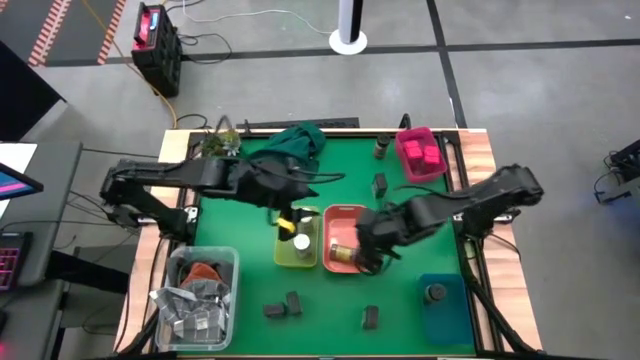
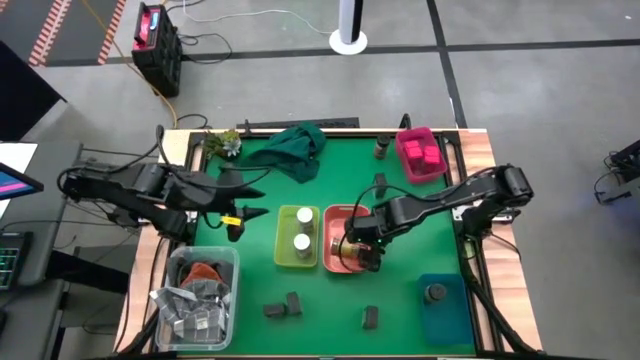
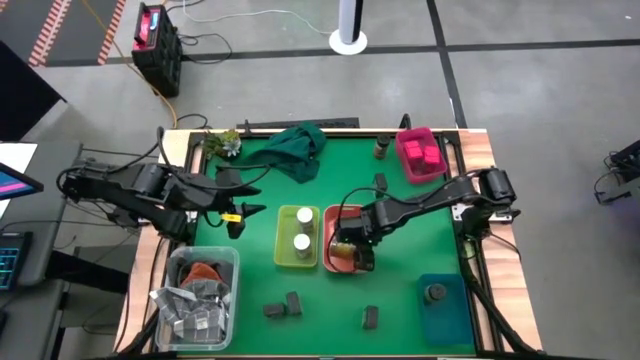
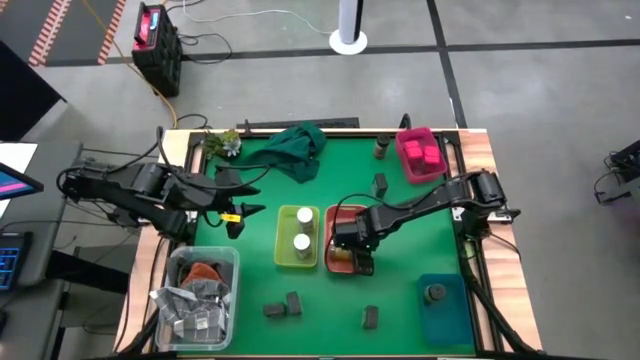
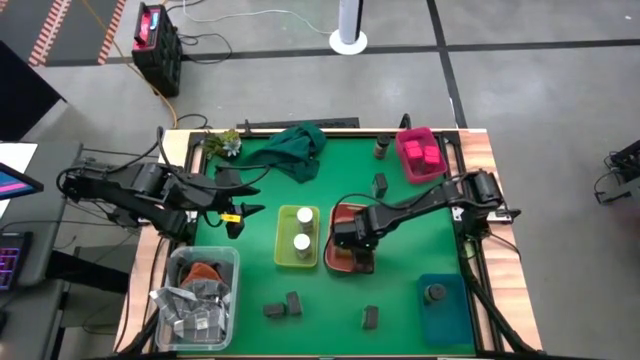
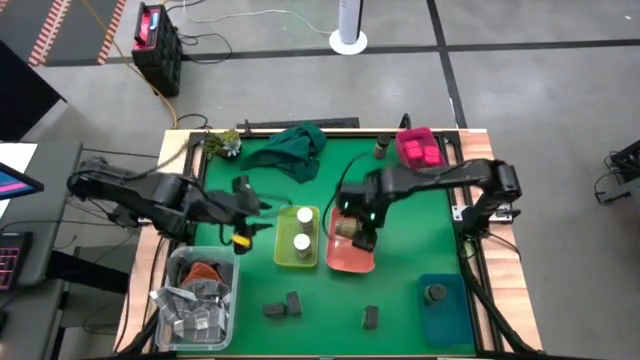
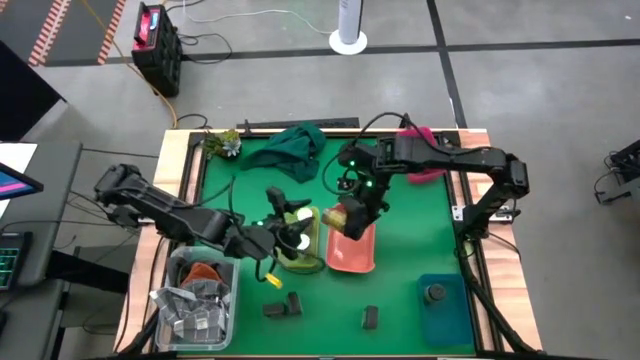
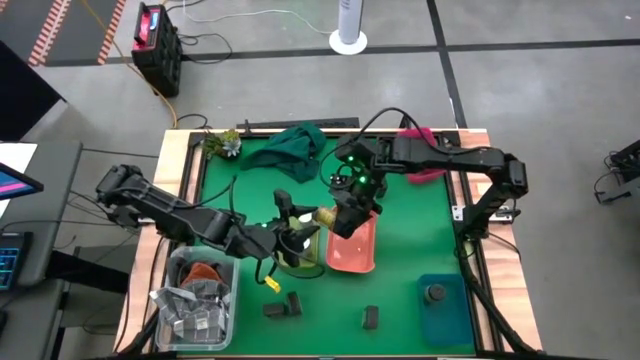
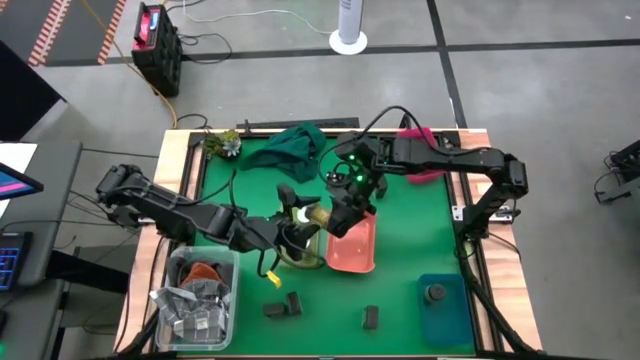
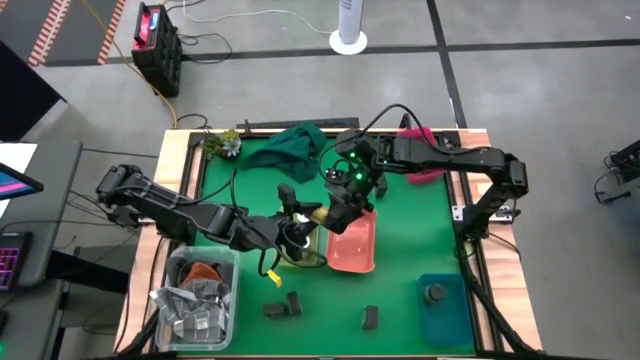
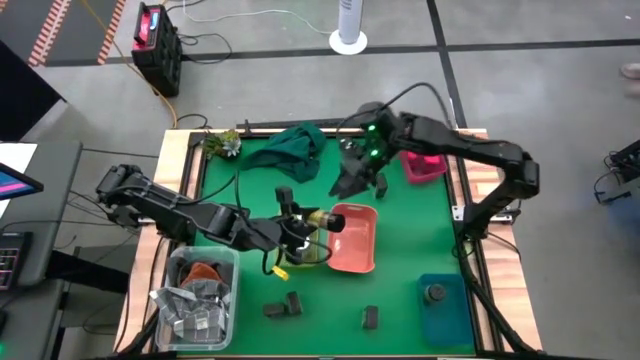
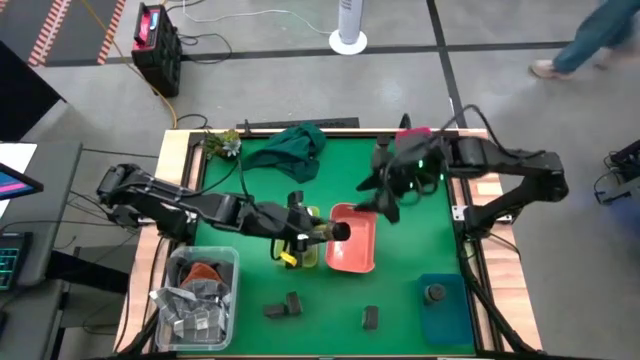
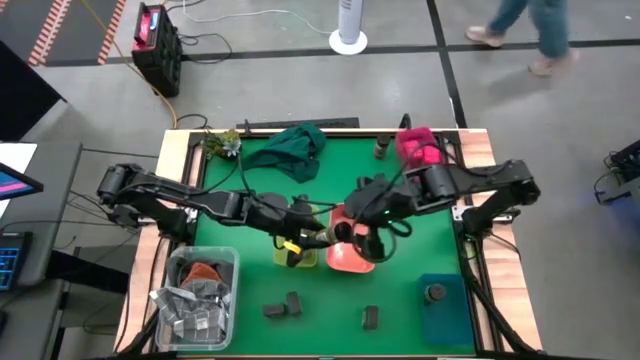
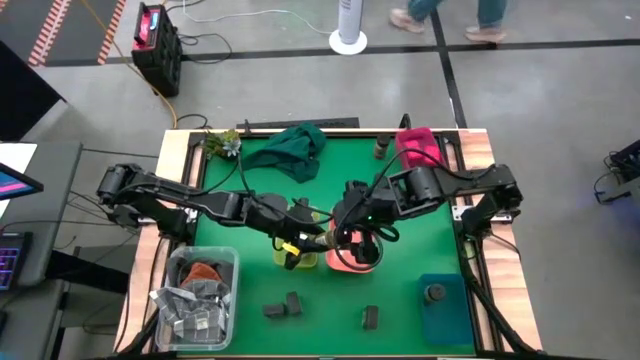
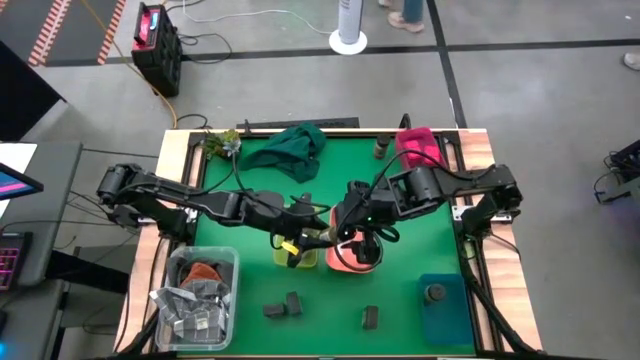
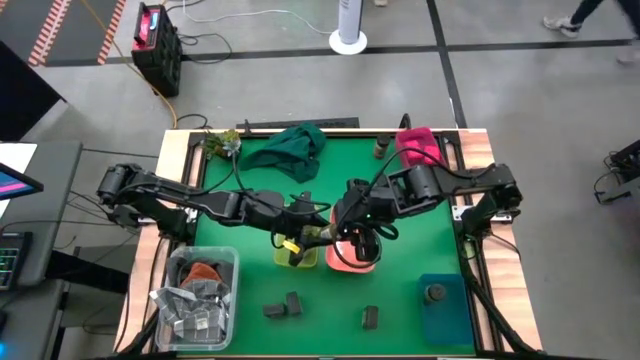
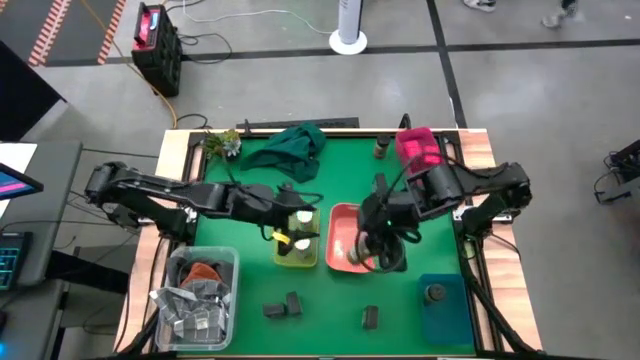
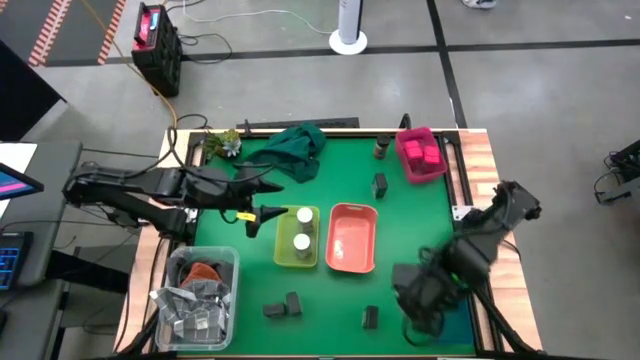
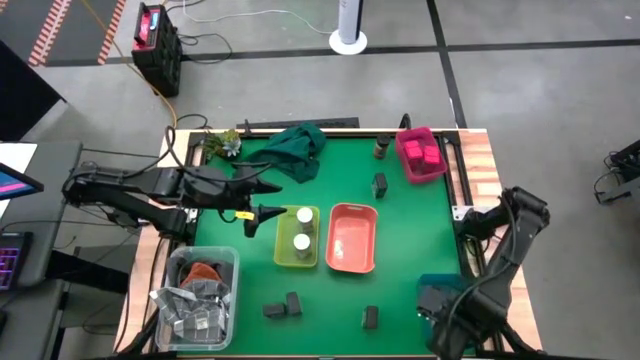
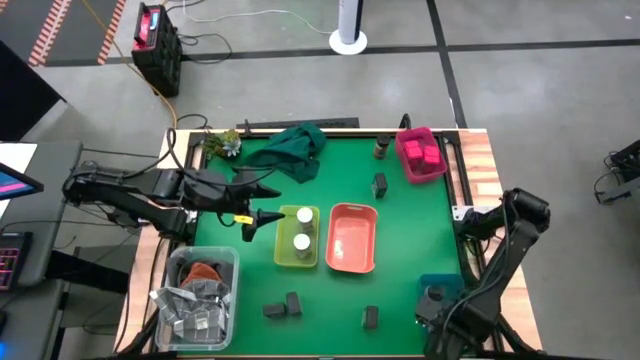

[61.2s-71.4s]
Task: Sort spices by type
Put the bottom black seasoning bottle into the blue bin

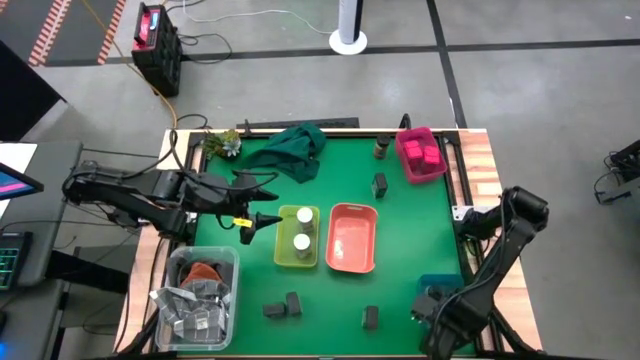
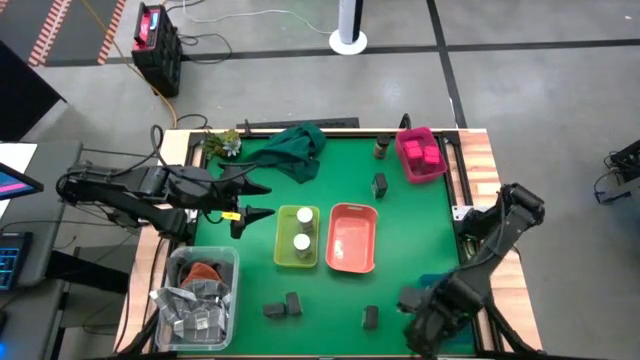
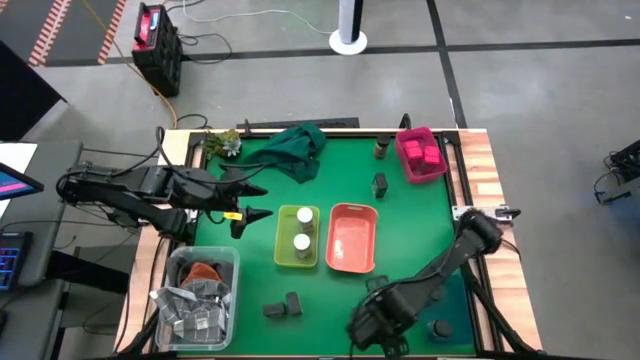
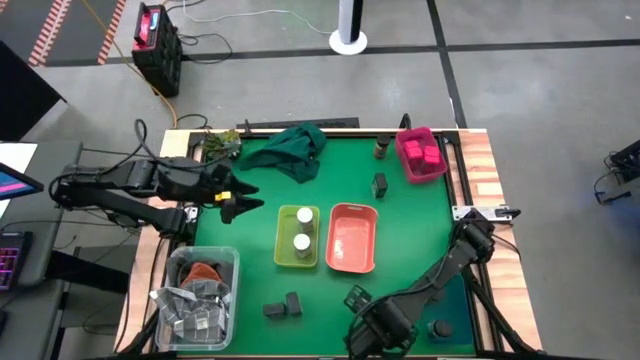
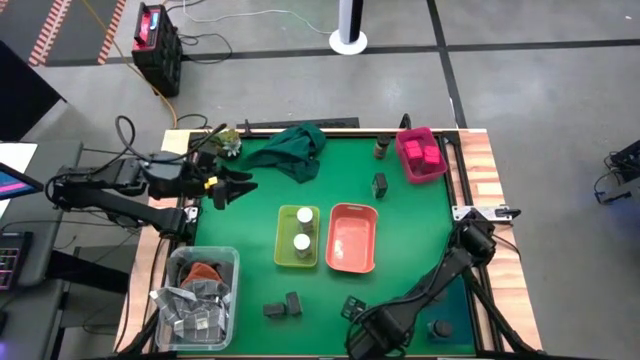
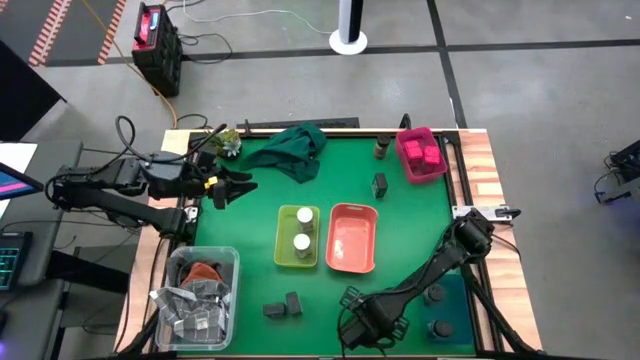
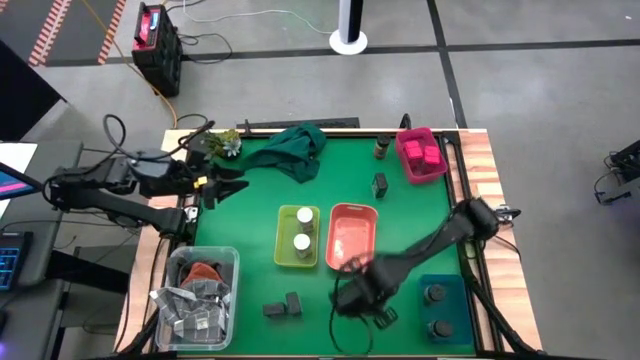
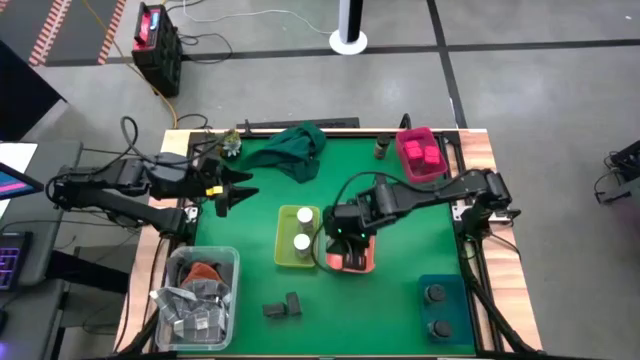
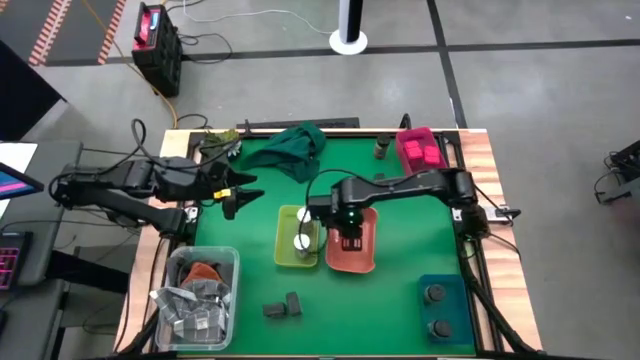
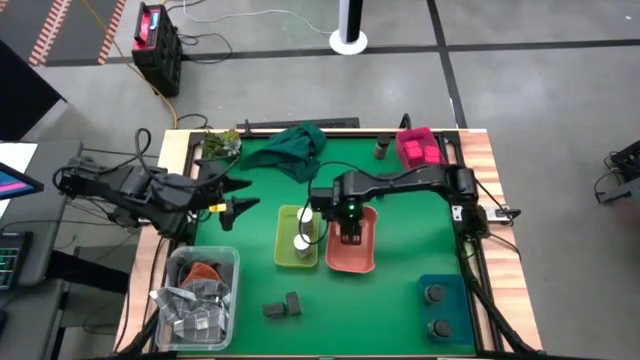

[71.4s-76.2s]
Put the bottom right black seasoning can into the orange bin

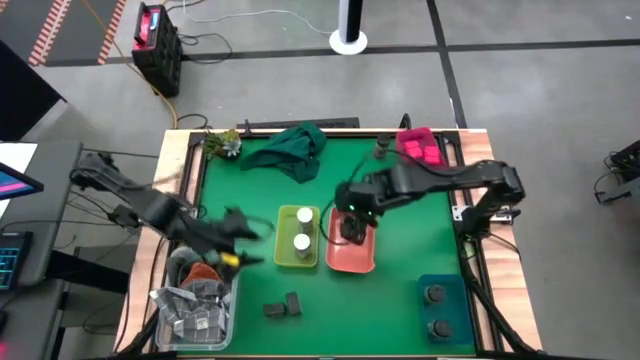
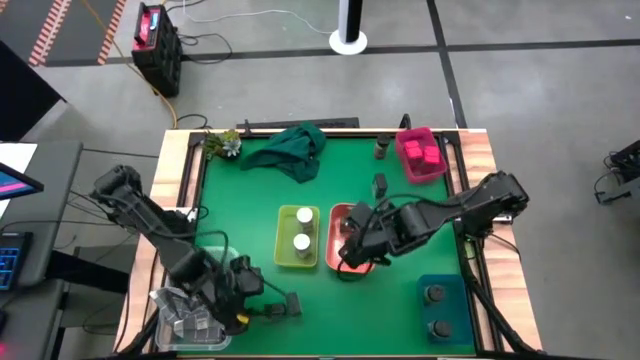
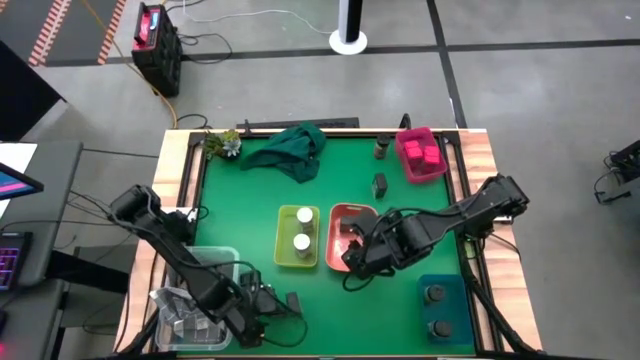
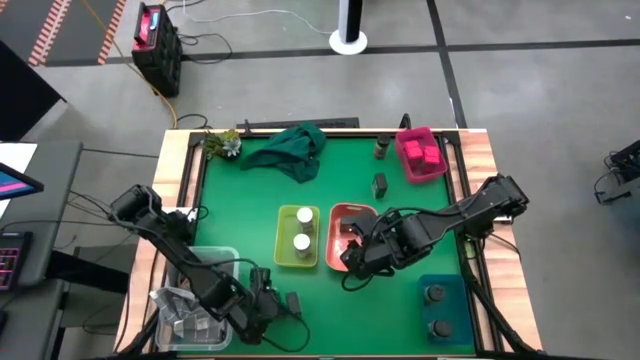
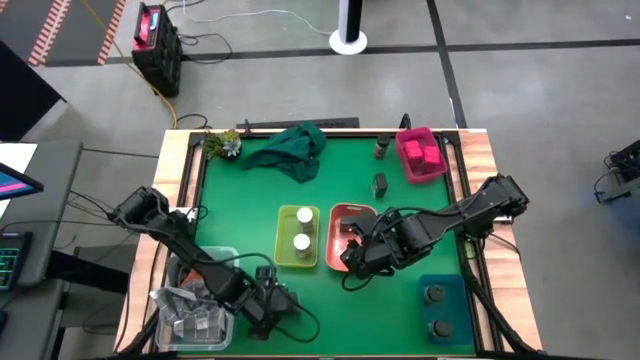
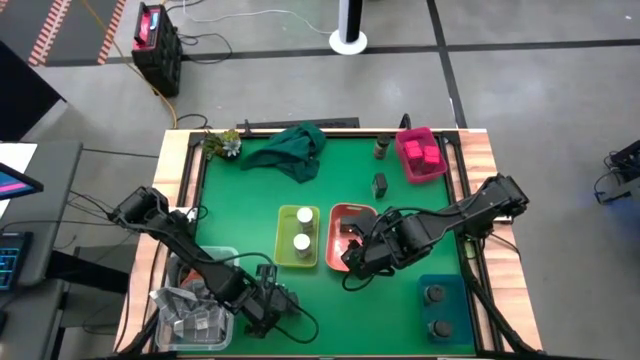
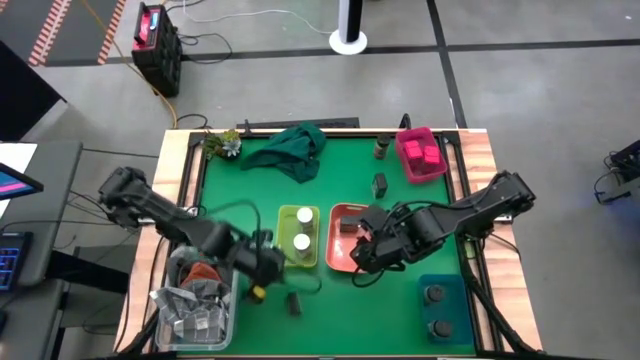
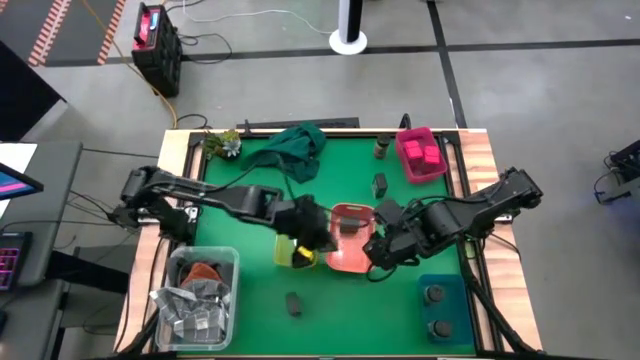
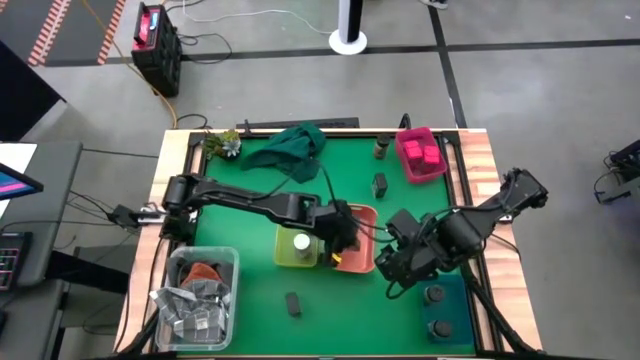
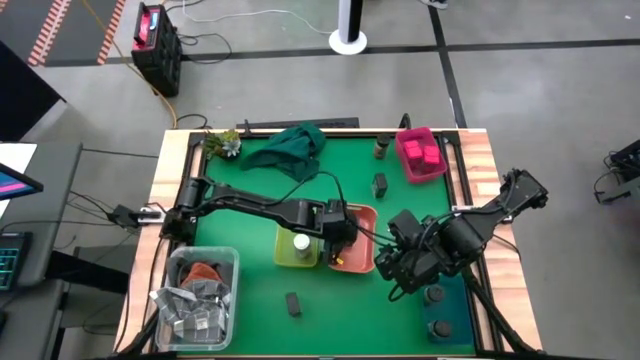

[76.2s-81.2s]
Put the bottom left black seasoning can into the orange bin

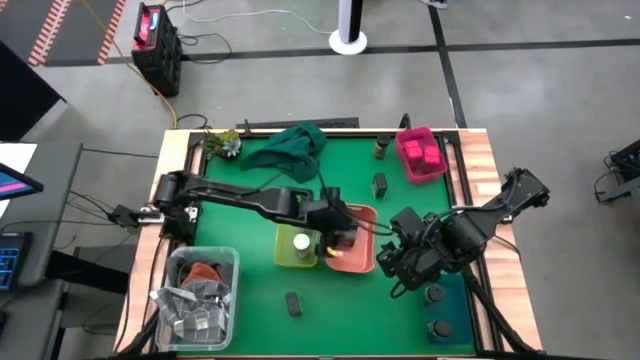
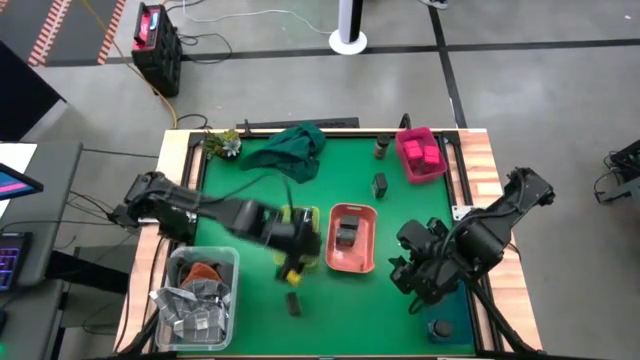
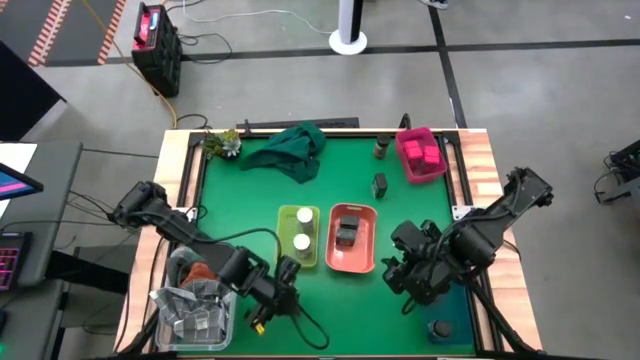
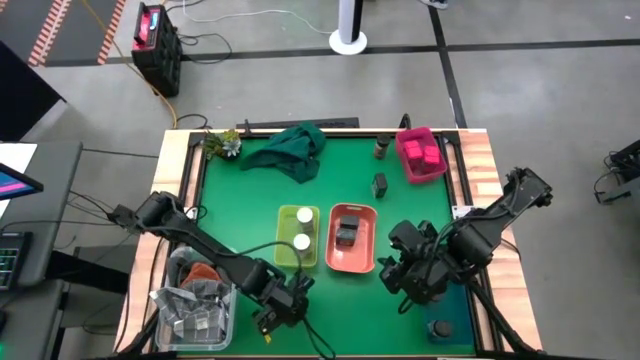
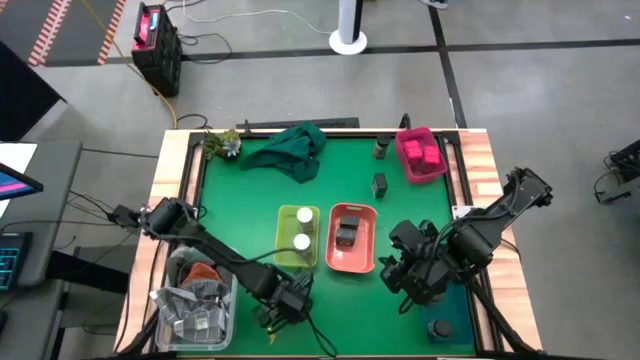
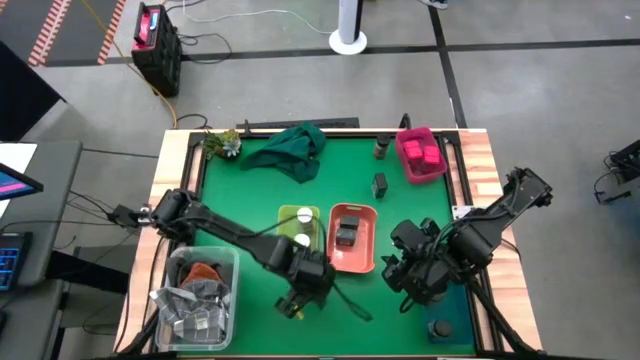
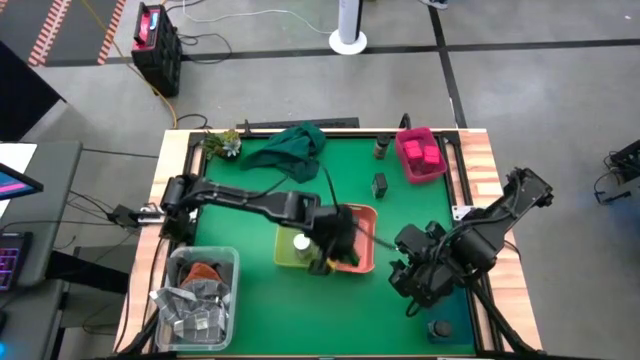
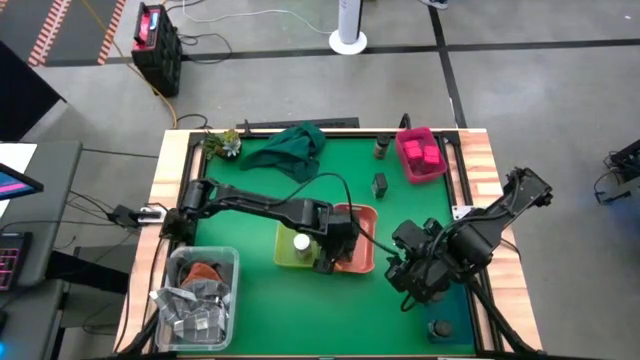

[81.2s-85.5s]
Put the bottom black seasoning can into the orange bin
